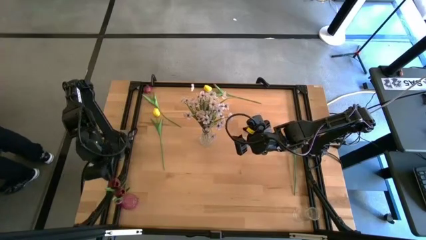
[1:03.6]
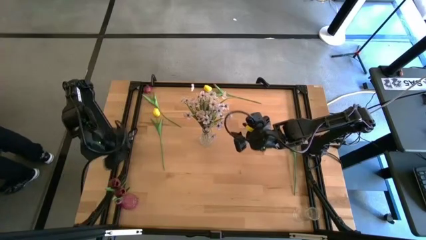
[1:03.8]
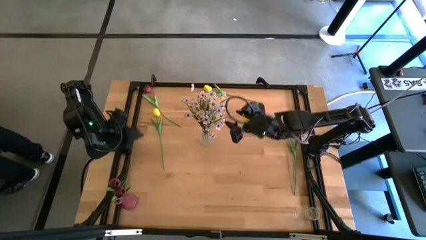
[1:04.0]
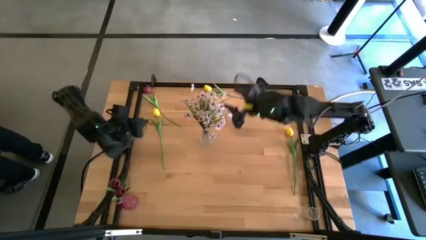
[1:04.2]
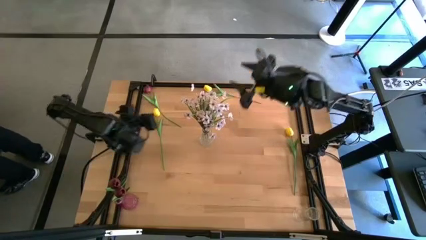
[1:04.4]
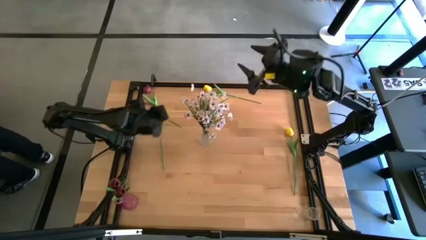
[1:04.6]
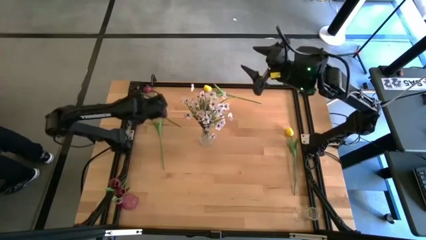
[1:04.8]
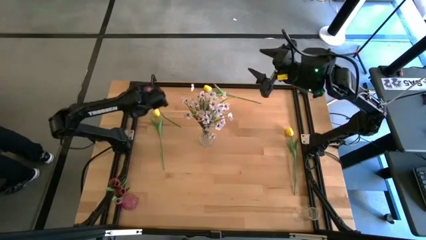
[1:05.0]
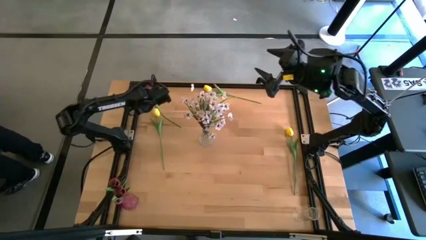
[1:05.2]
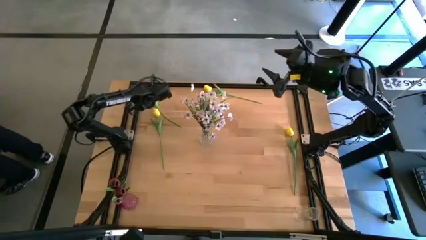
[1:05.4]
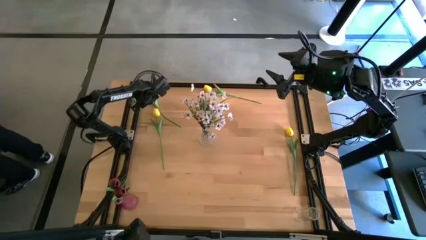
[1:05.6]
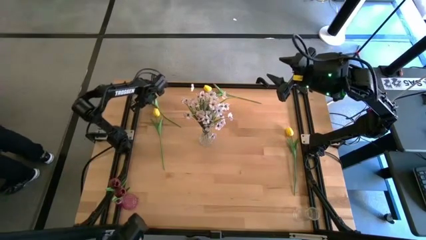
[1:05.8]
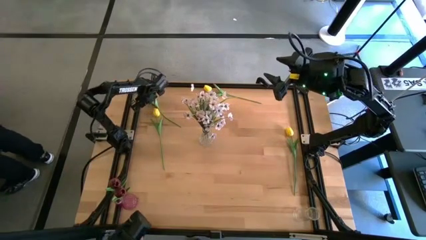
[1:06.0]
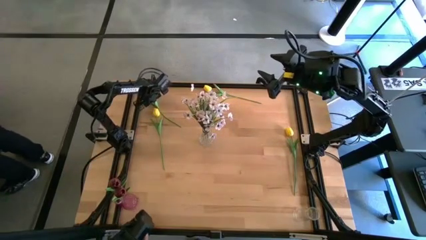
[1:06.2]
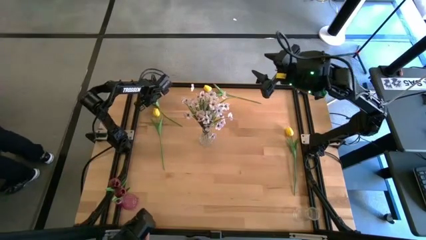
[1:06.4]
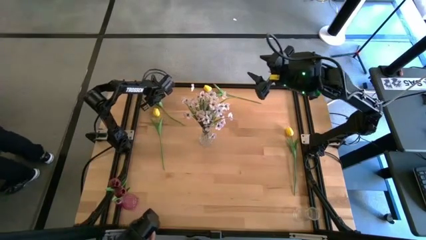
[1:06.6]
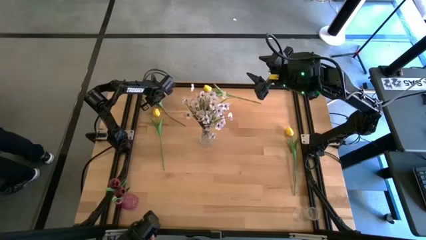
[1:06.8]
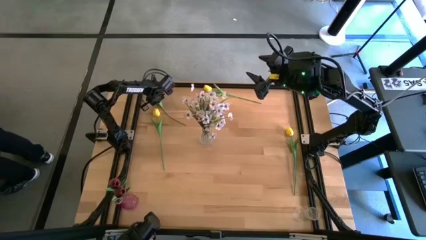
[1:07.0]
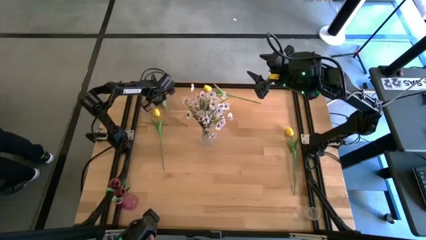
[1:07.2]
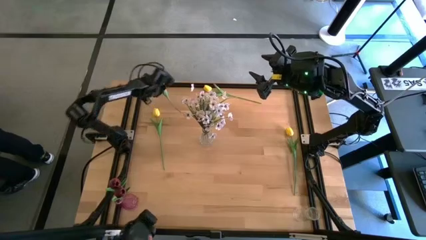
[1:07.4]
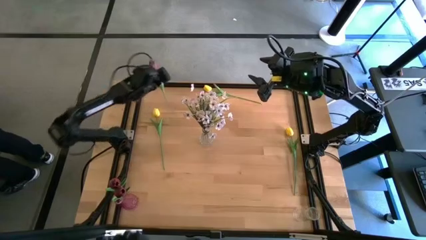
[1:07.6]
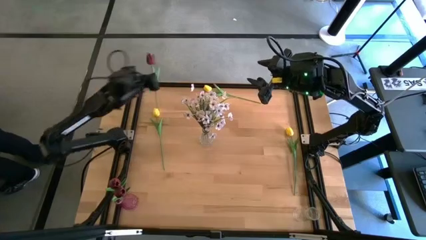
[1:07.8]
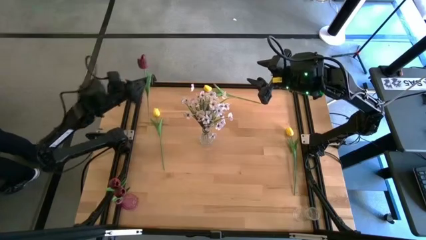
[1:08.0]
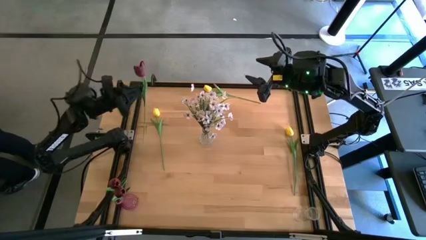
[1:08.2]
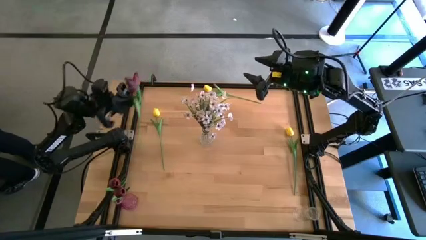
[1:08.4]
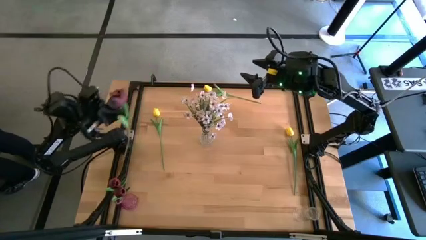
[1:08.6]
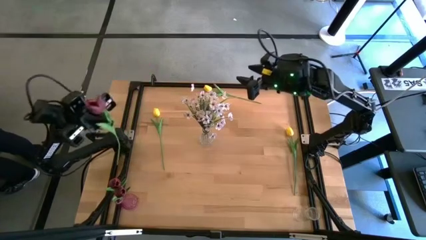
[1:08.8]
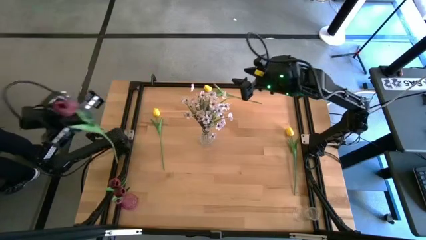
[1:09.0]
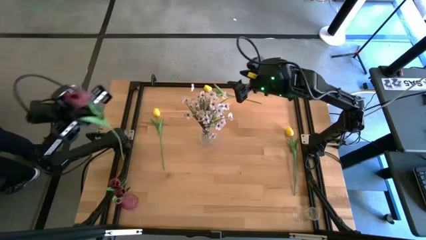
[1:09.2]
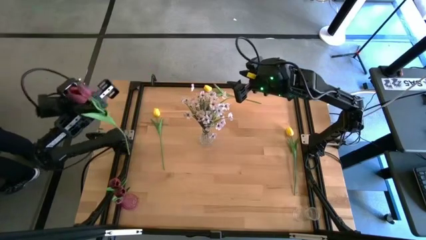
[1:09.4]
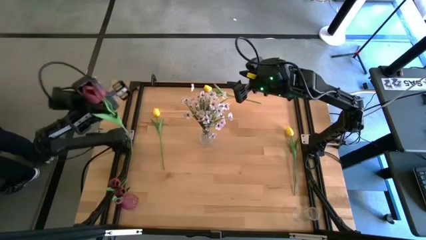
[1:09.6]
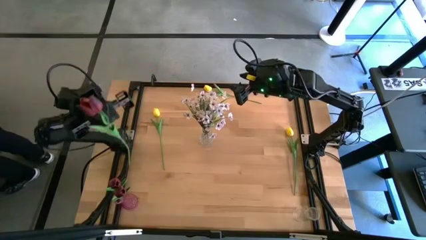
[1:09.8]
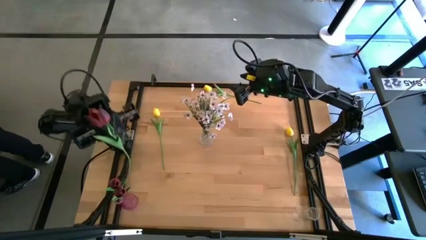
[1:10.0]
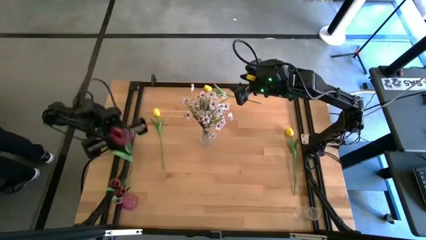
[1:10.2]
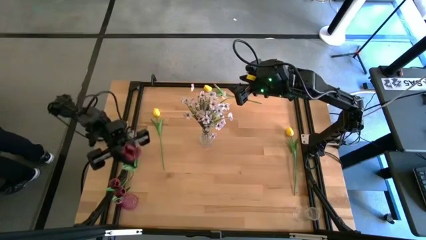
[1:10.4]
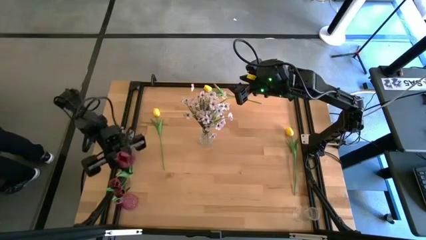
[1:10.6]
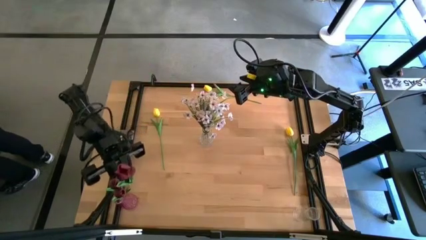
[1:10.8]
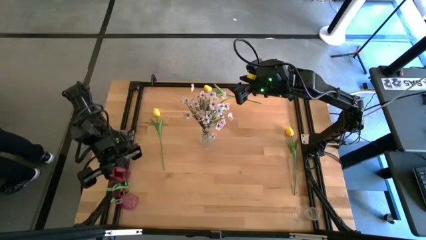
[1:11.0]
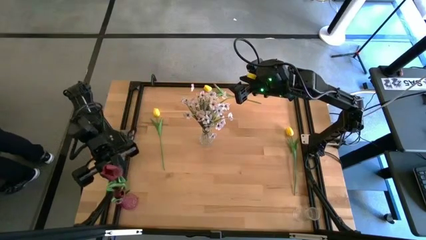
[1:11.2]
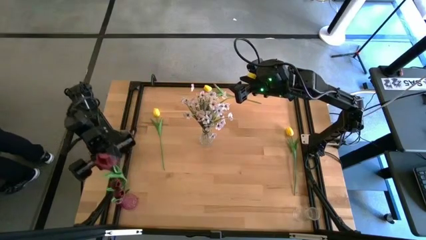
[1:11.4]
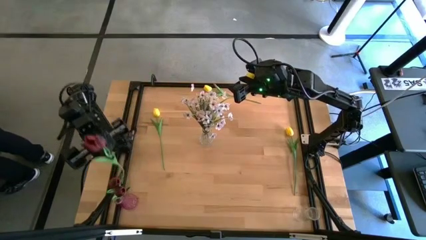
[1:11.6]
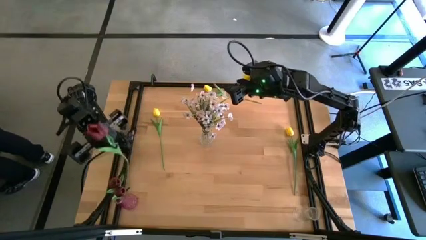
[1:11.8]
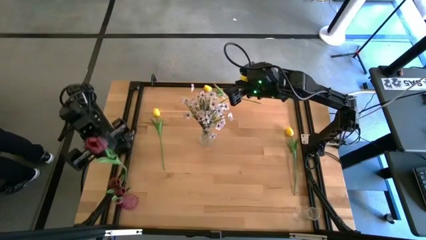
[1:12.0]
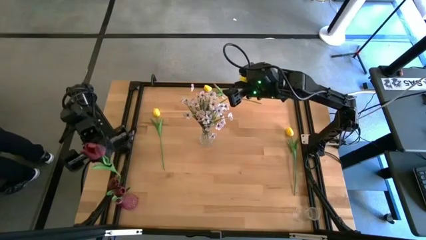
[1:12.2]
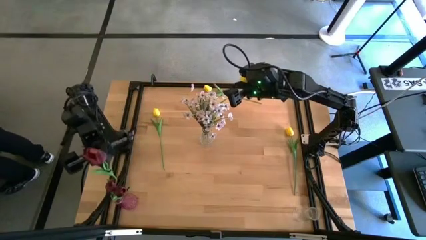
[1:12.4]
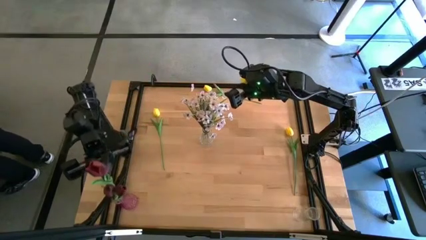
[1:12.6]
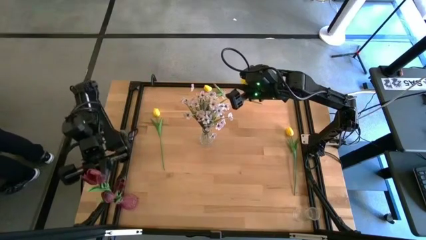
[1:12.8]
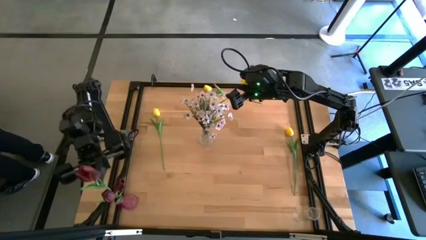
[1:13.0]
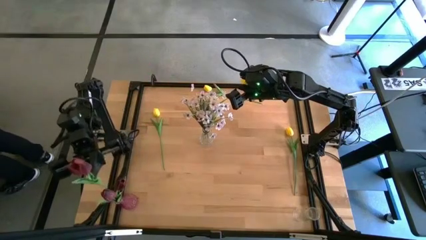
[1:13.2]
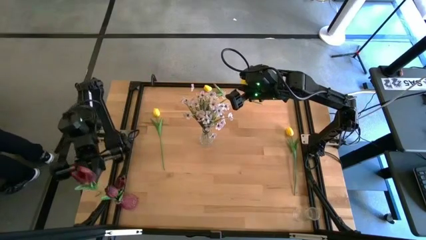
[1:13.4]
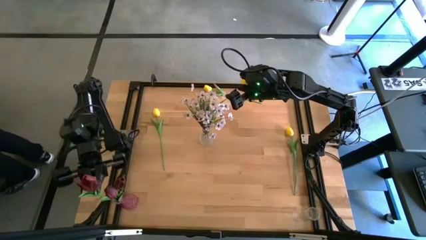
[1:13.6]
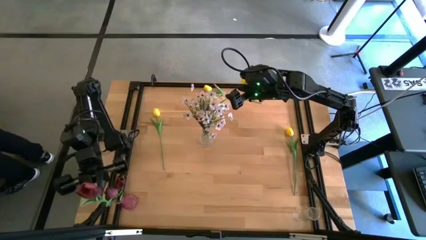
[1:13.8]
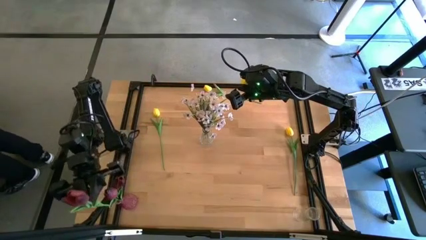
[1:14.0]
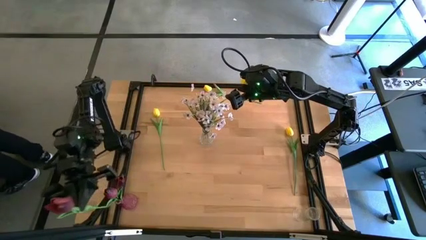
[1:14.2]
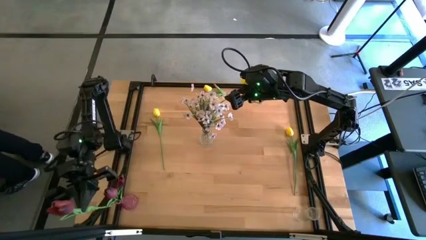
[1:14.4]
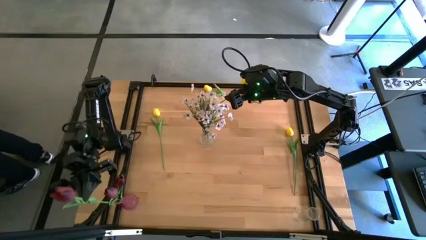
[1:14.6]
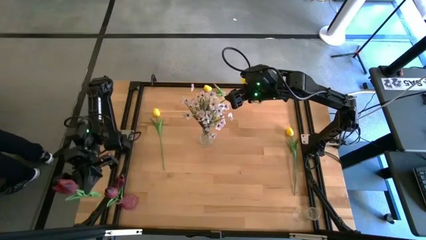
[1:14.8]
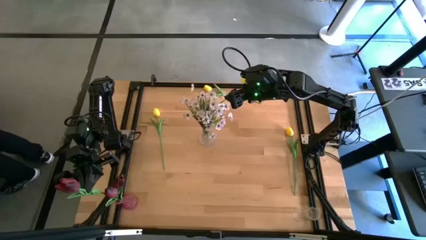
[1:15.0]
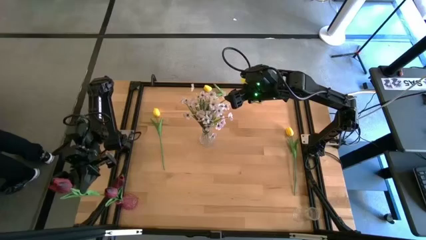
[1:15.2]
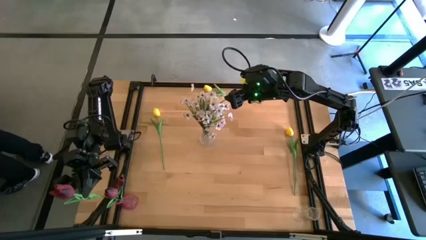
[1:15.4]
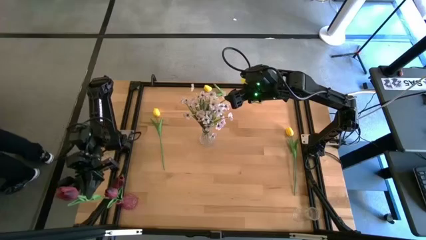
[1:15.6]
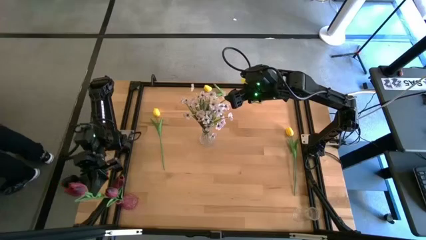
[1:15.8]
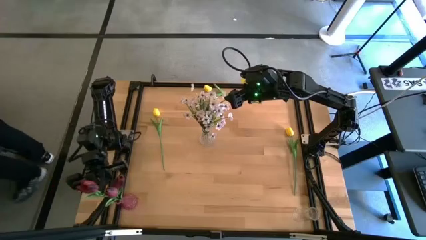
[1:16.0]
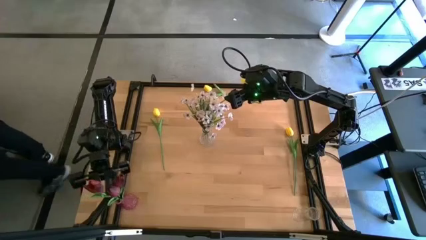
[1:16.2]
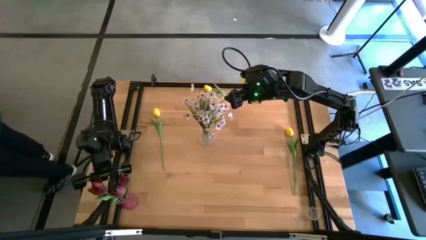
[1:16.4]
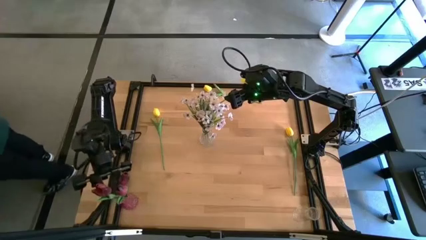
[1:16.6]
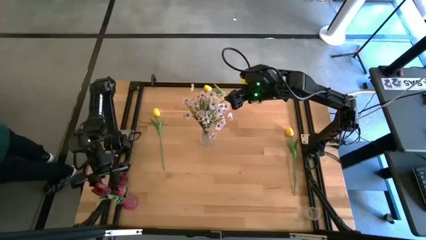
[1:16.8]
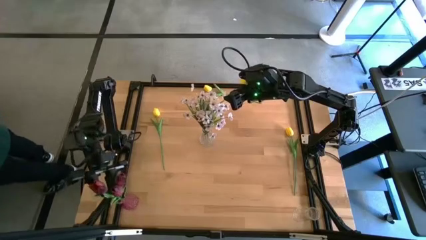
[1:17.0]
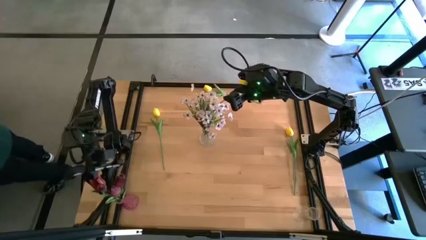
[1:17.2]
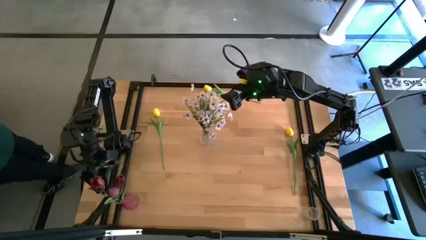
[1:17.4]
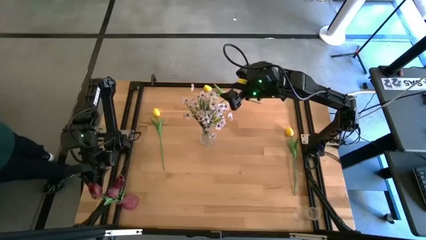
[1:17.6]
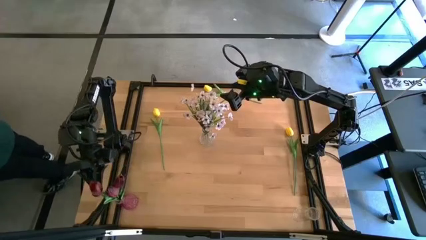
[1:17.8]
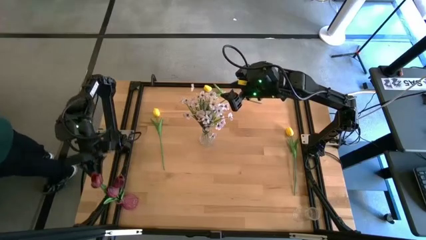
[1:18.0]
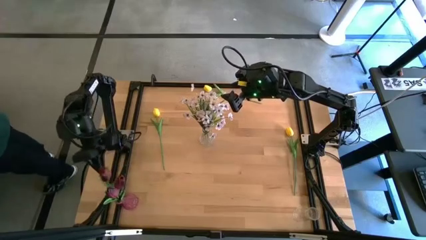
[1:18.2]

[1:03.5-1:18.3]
Task: Sort flowers into vase by color
Put the red tulip into the transparent pink vase
